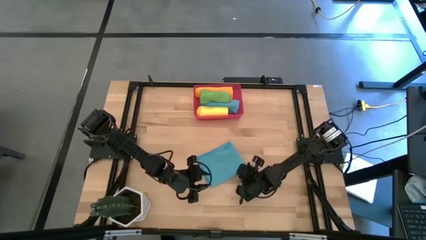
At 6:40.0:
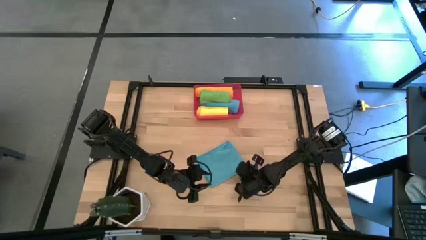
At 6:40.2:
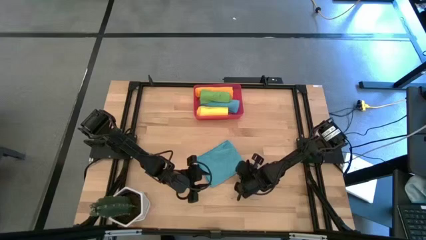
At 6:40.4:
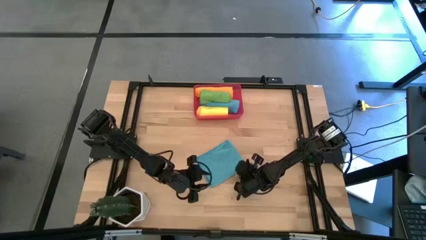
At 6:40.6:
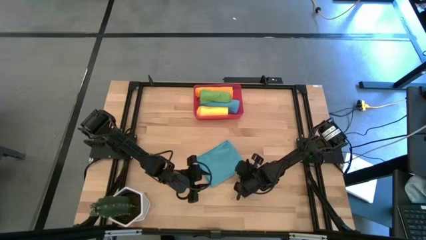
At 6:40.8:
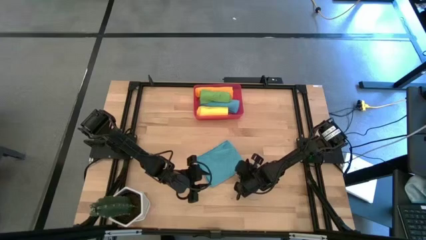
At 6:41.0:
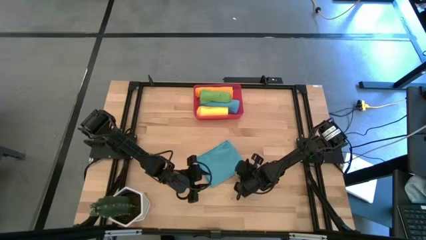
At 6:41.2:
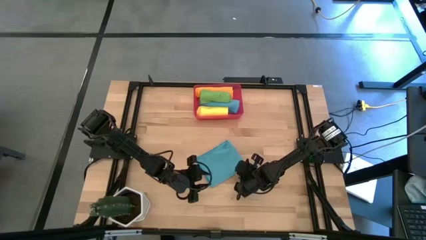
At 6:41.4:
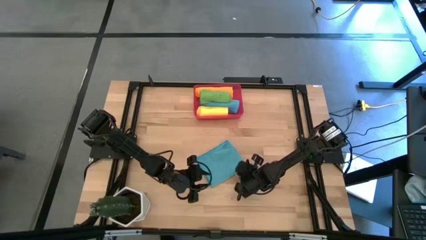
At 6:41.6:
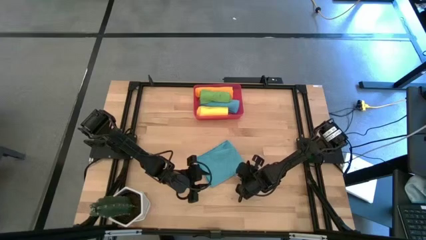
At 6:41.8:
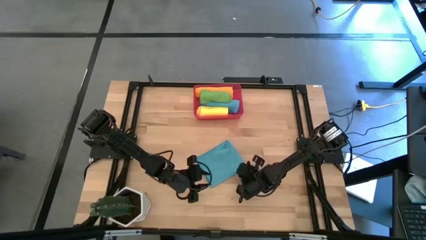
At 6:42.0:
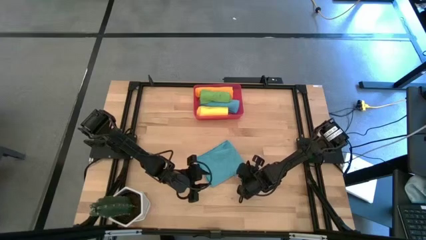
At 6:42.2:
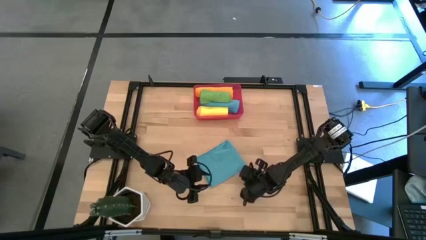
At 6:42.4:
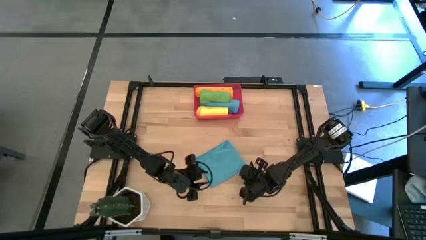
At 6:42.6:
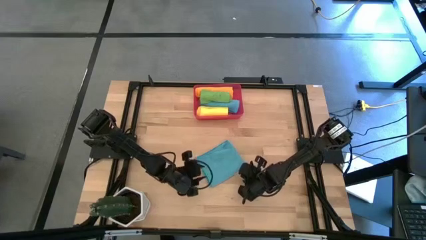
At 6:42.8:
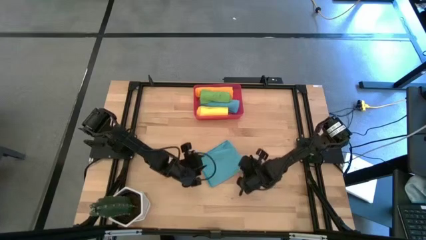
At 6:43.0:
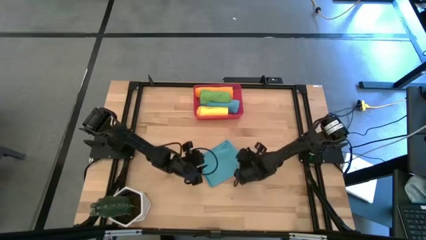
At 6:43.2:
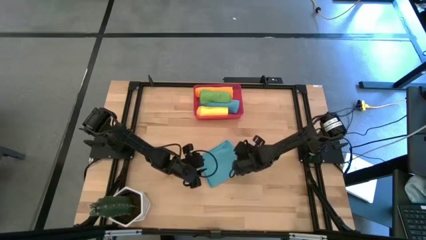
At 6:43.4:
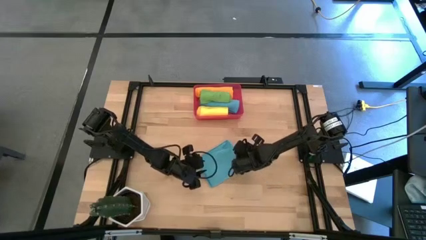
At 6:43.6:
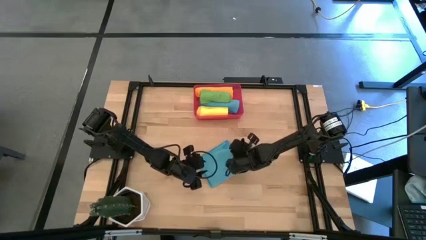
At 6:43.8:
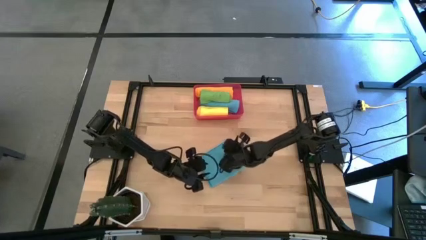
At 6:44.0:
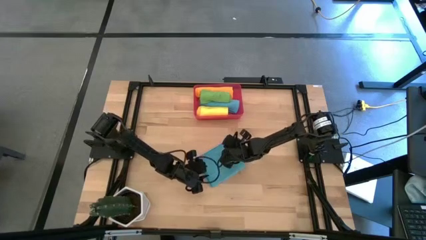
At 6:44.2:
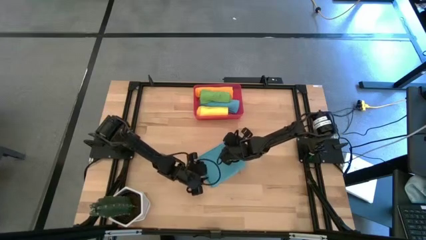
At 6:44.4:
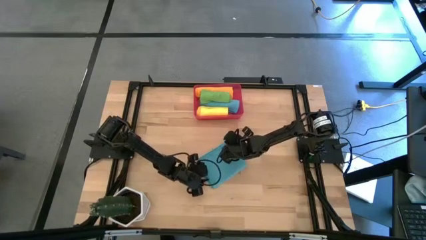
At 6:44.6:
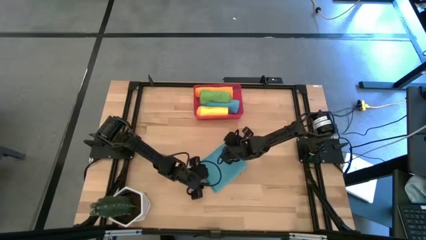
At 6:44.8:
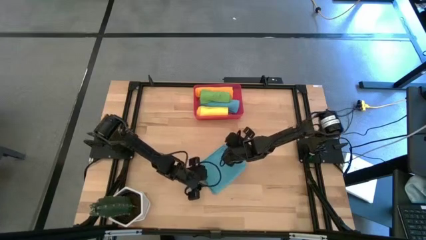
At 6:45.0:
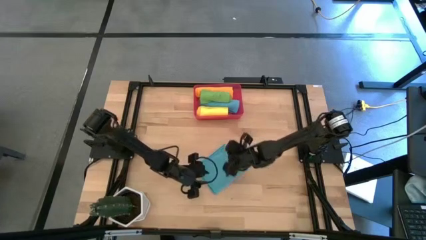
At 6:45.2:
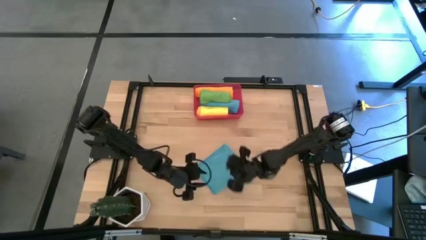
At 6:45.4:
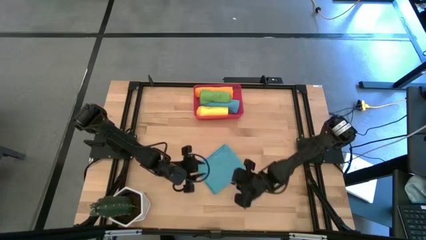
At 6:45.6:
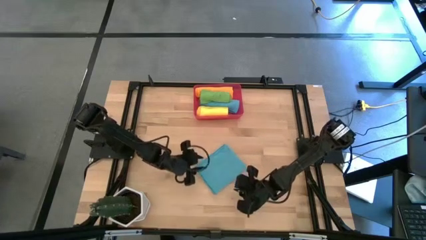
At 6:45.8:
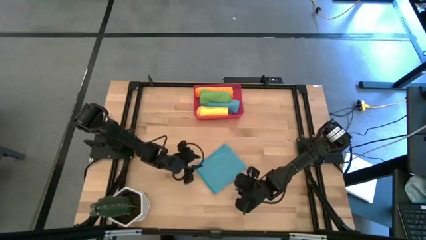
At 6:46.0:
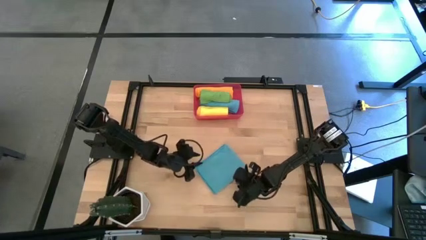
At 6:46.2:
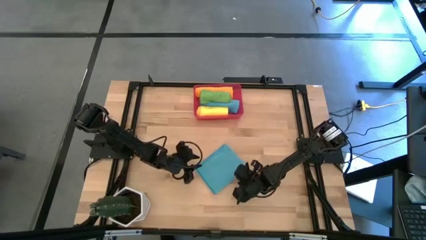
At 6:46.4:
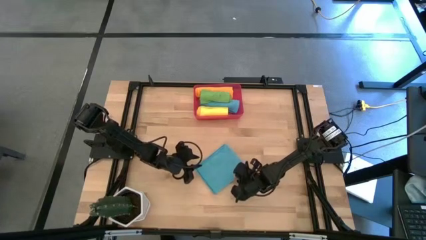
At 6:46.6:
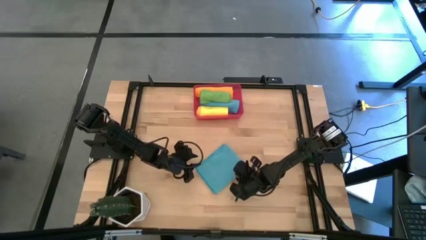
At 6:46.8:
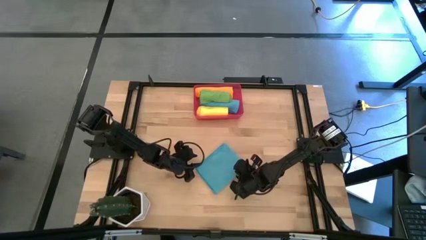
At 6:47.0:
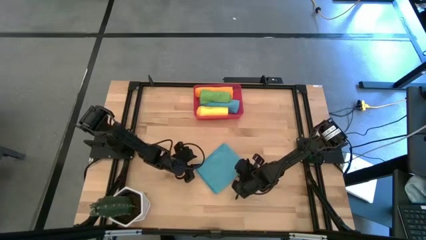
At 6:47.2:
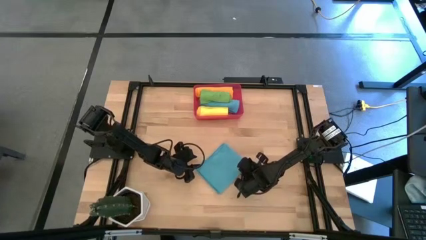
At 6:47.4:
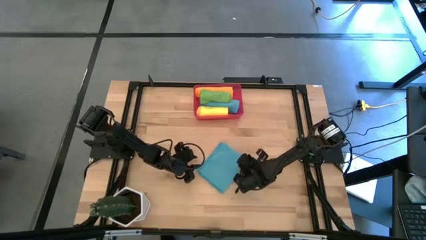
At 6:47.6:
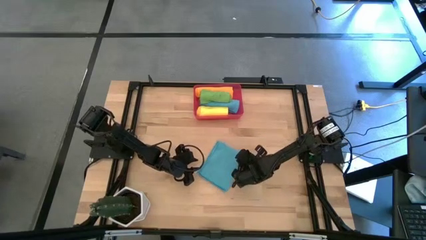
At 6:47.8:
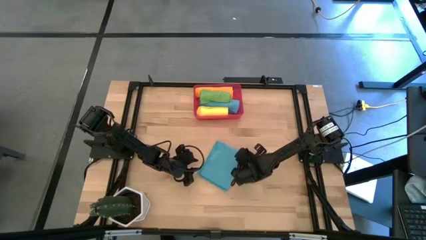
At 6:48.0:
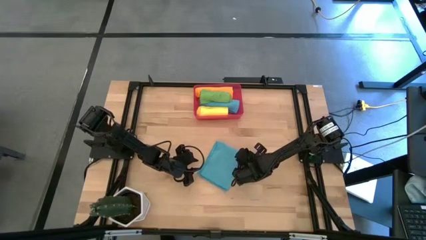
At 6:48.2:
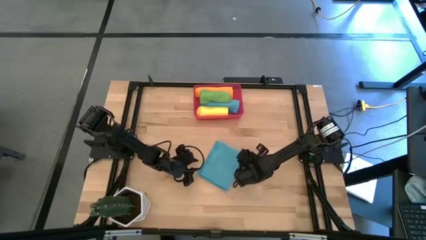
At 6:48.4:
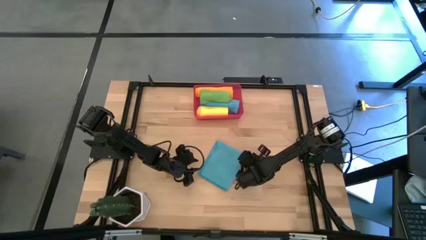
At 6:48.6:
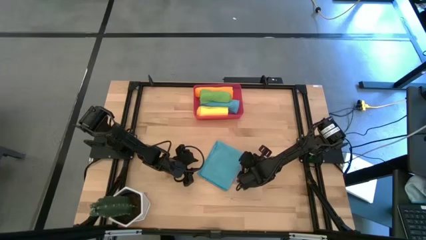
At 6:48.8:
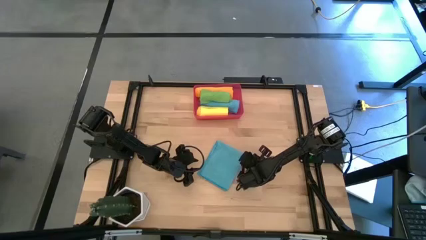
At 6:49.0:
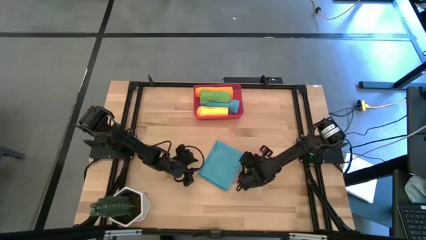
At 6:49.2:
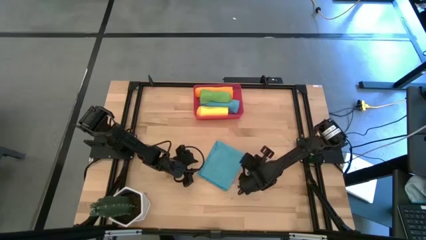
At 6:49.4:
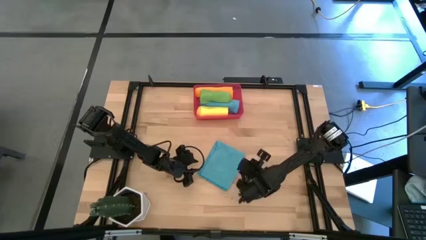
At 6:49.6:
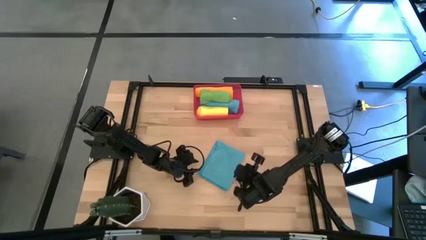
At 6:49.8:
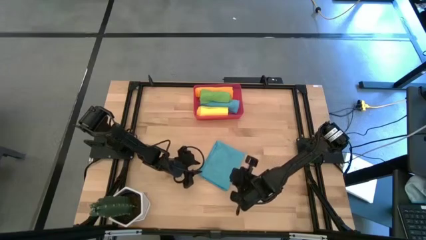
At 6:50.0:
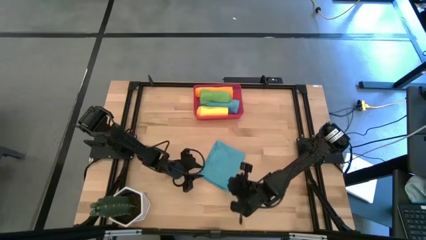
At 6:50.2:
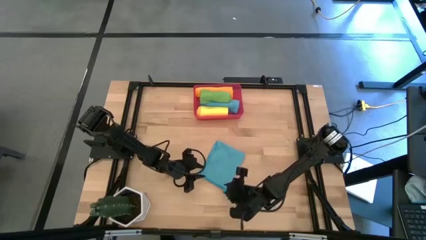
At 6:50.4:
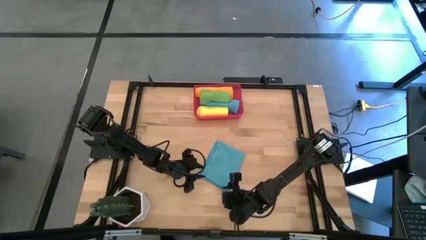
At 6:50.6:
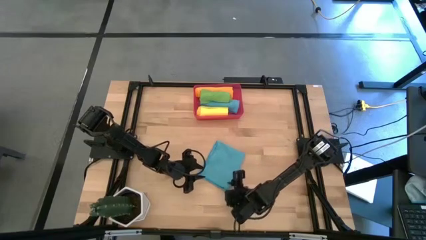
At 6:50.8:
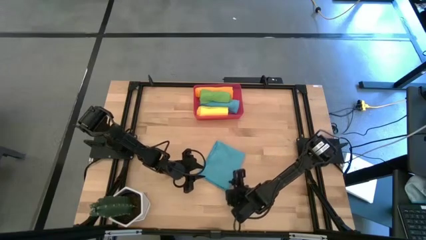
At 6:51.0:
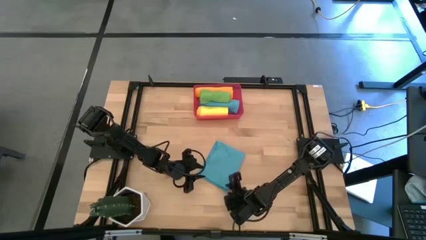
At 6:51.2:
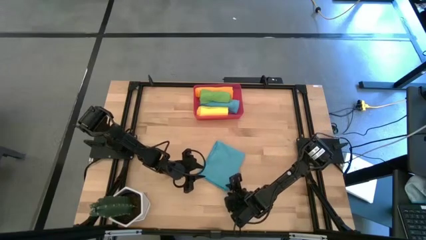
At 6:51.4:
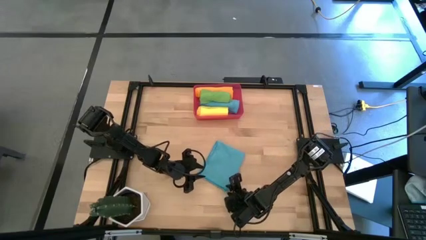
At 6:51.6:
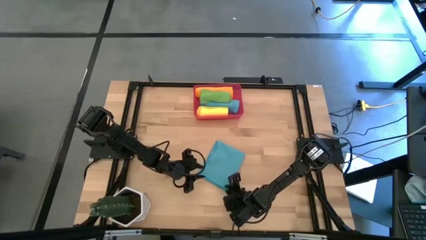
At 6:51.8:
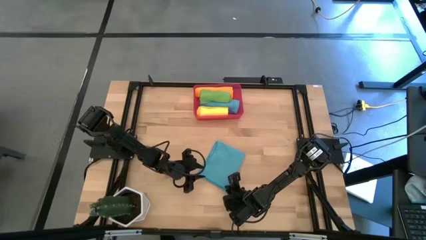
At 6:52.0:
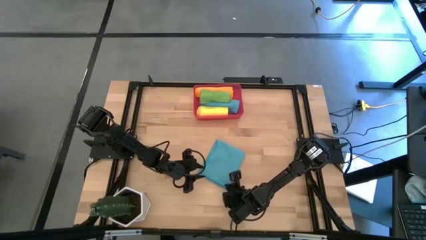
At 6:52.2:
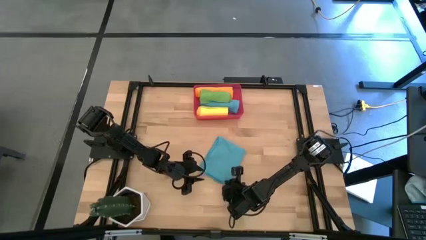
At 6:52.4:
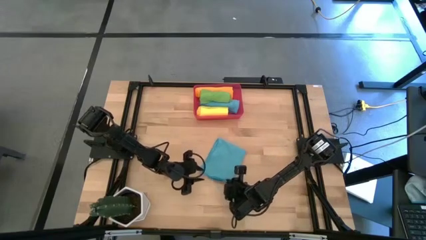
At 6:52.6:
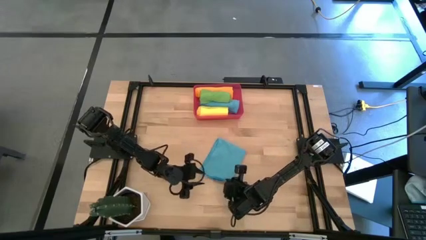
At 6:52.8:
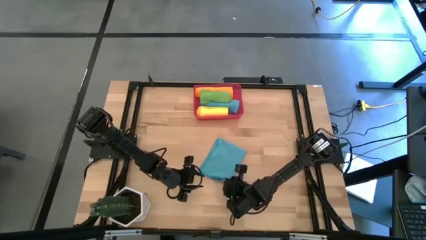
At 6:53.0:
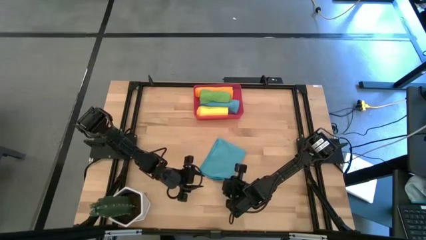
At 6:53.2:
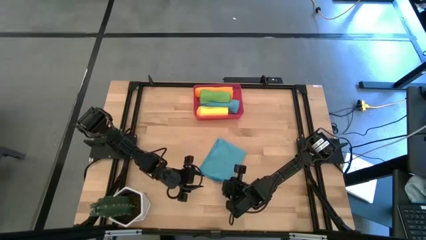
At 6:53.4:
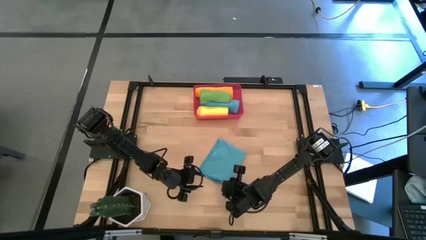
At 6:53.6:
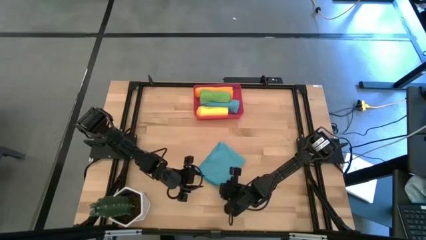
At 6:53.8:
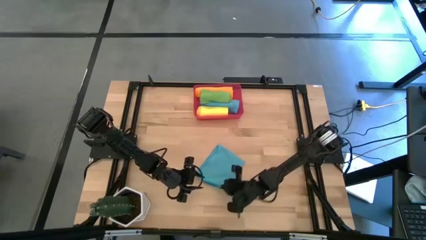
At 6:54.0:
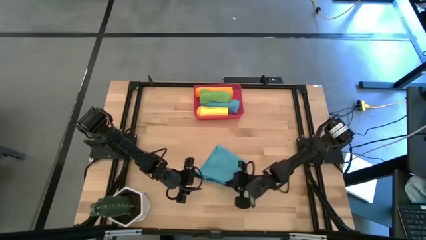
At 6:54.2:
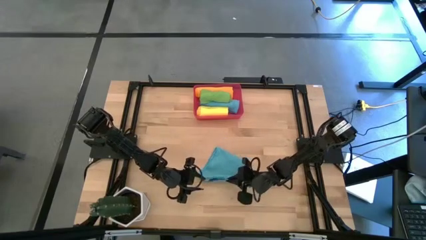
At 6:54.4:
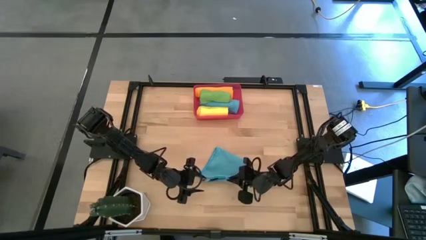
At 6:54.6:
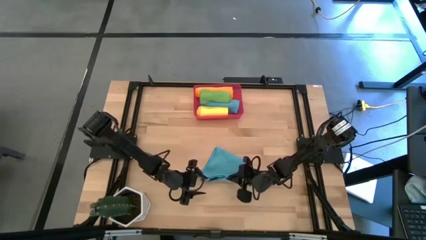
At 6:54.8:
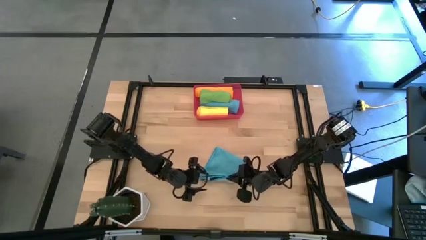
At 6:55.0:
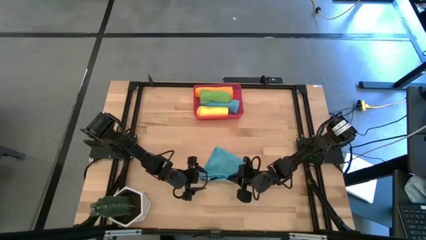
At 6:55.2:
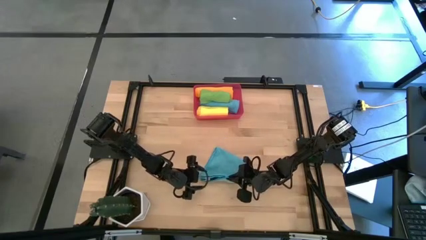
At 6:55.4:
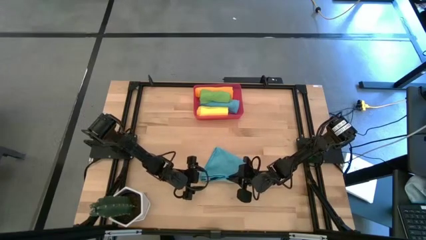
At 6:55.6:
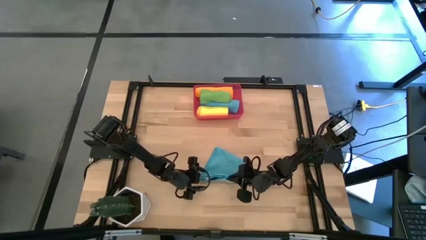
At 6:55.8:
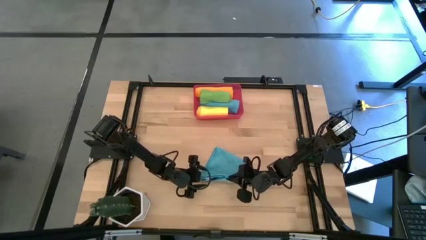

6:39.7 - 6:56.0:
Task: Roll microfiber towels into tight, uniform cylinder then place into a basket
Roll the blue microfiber cloth
